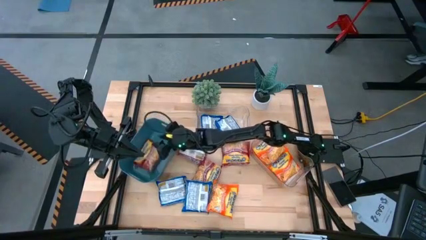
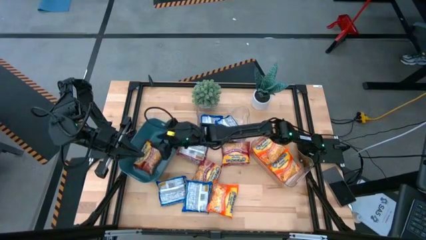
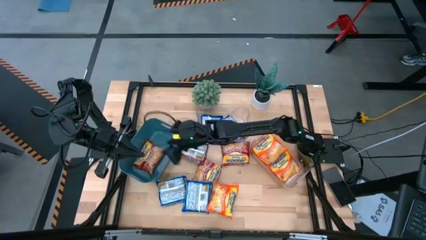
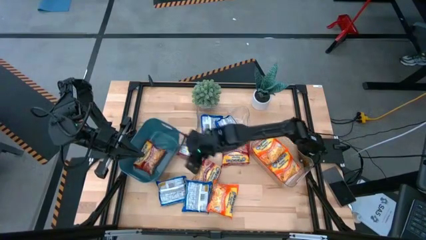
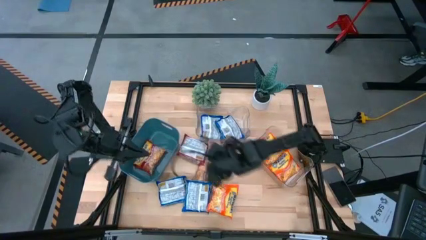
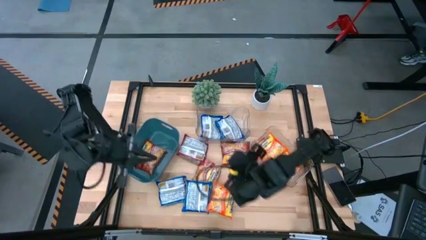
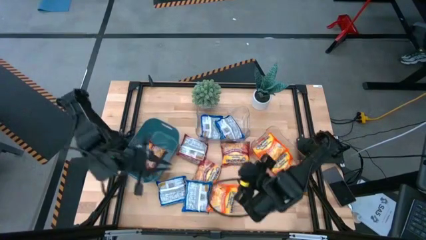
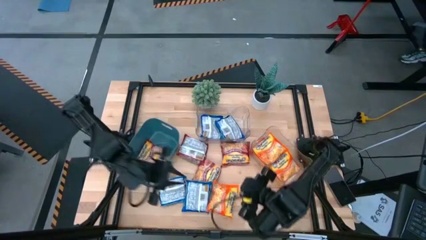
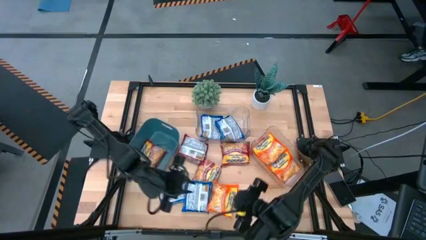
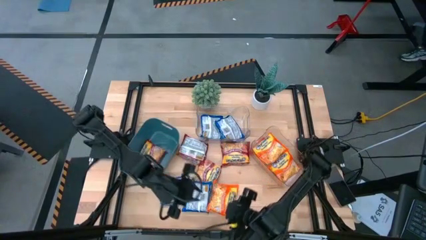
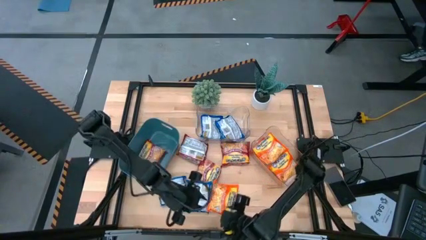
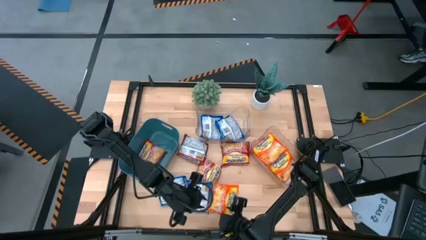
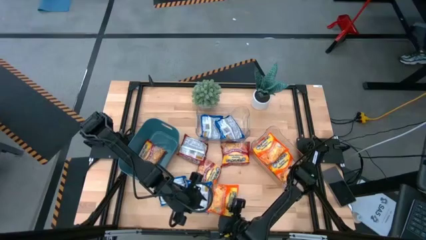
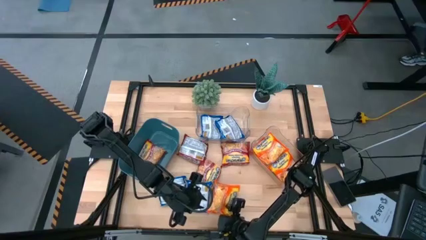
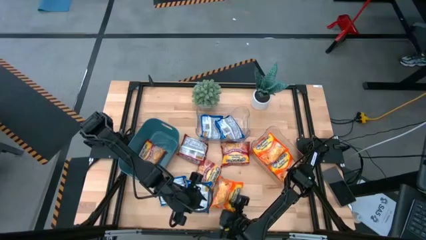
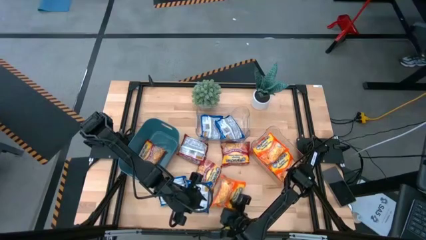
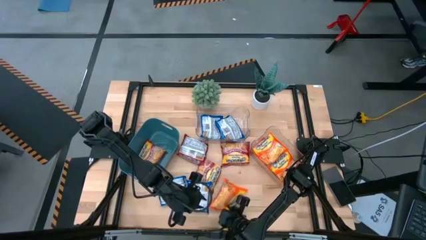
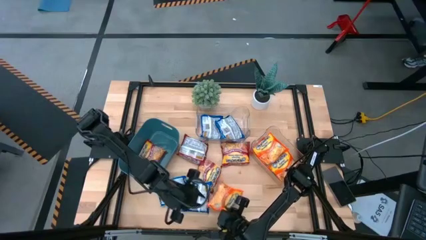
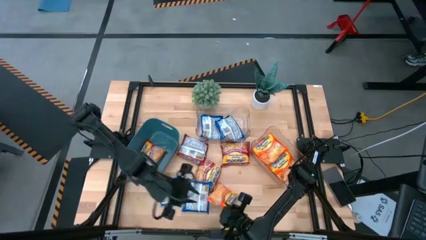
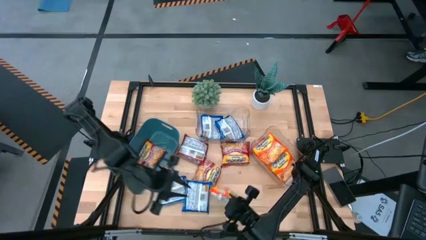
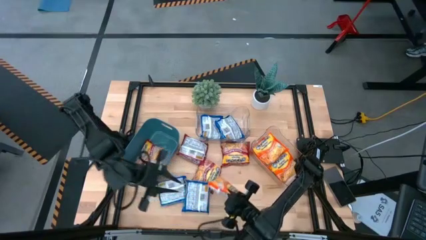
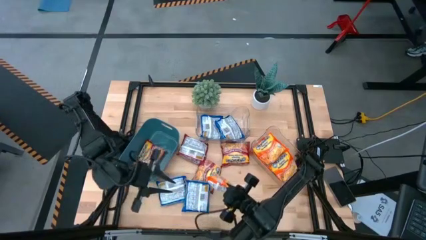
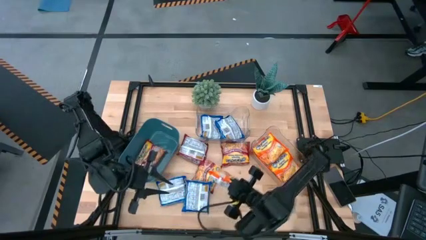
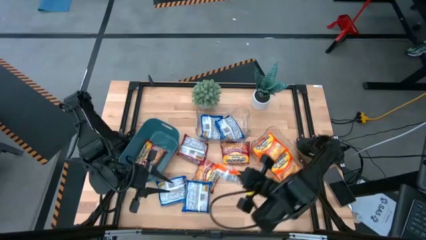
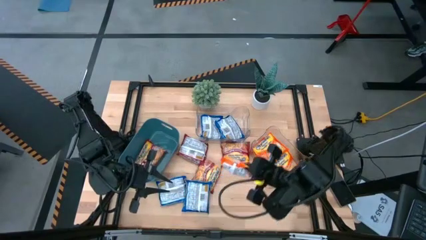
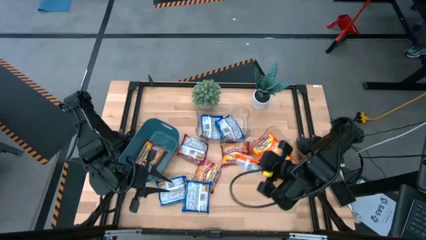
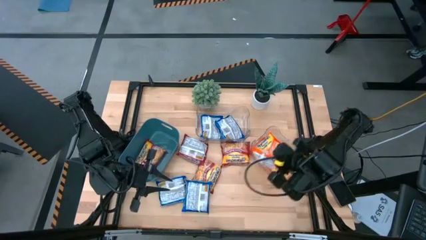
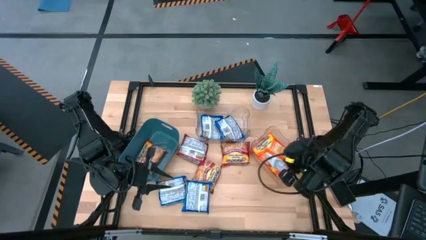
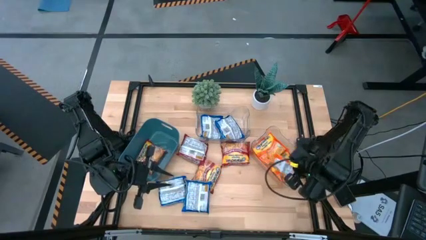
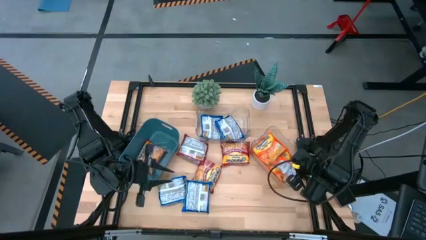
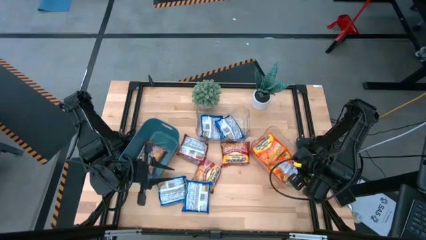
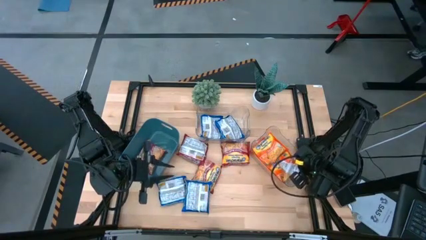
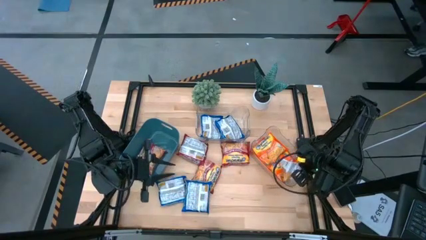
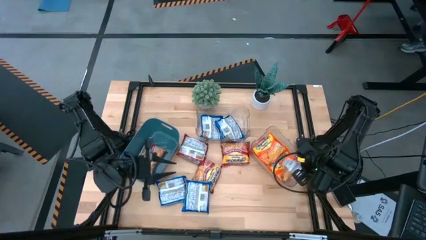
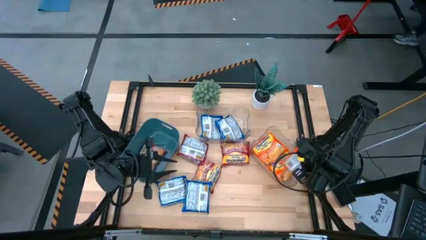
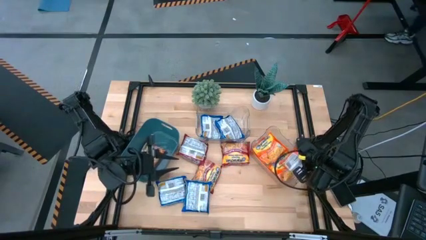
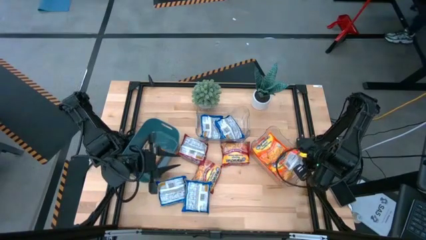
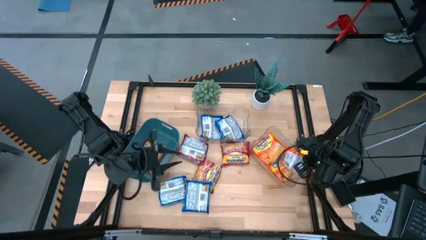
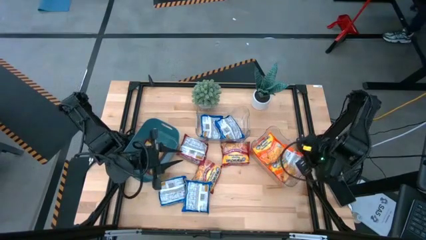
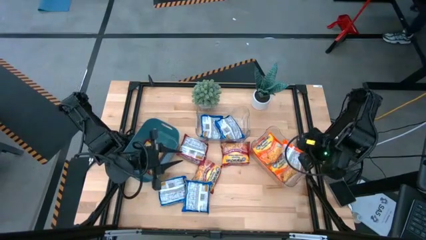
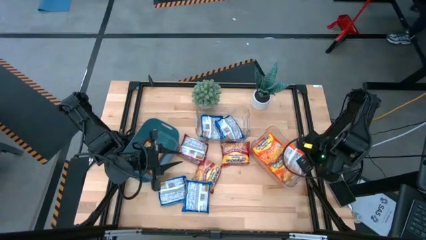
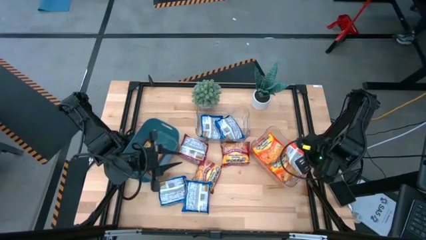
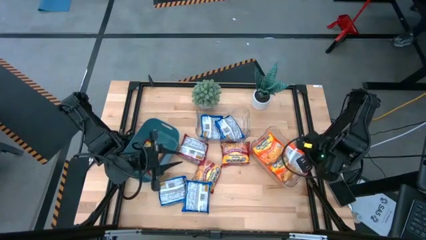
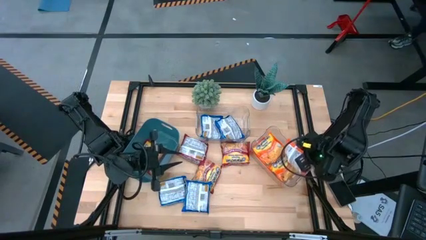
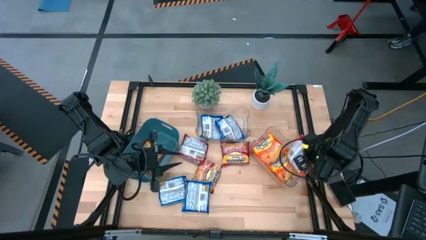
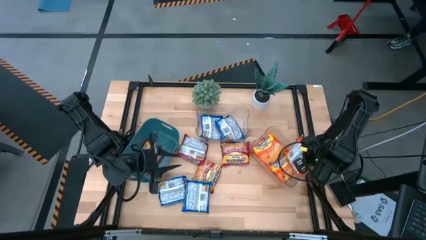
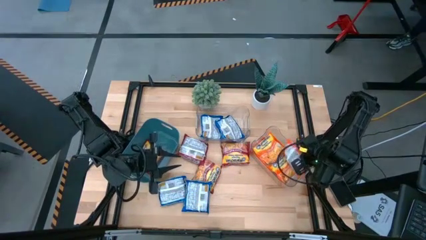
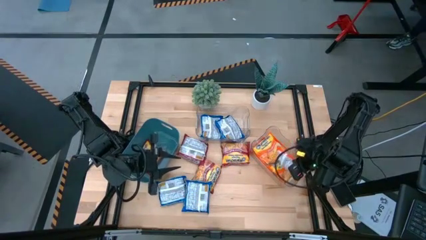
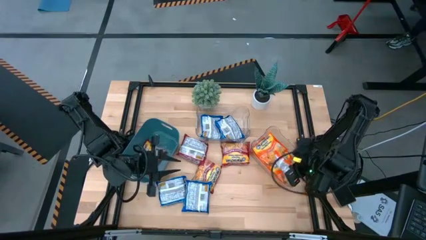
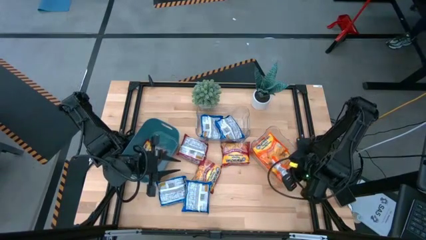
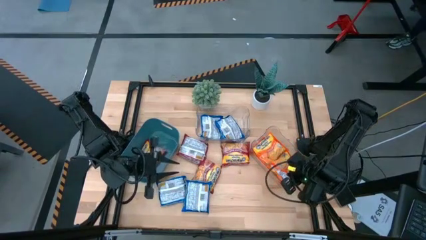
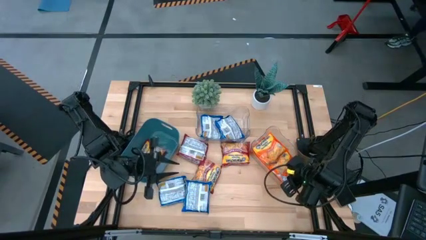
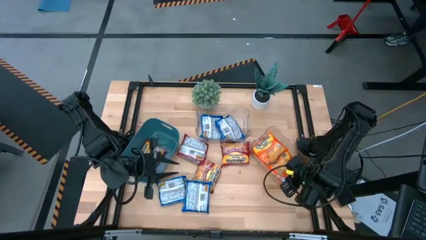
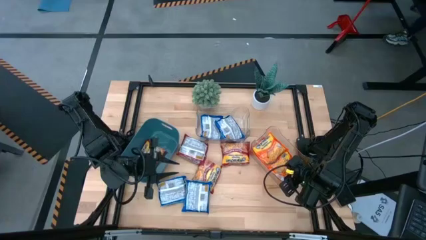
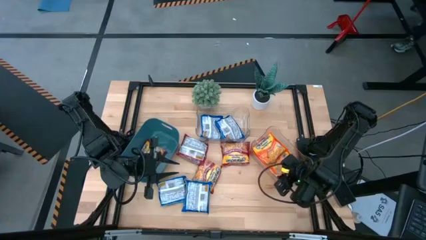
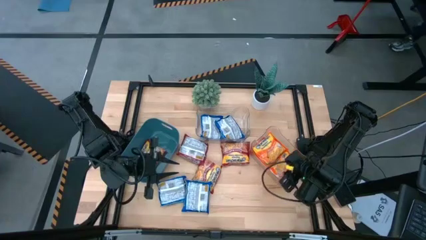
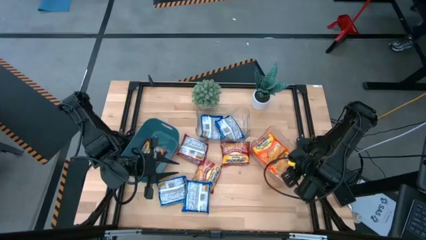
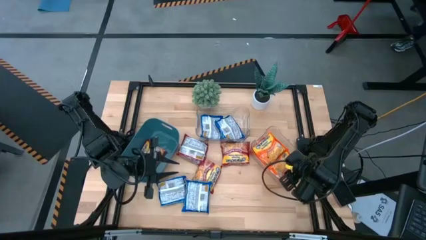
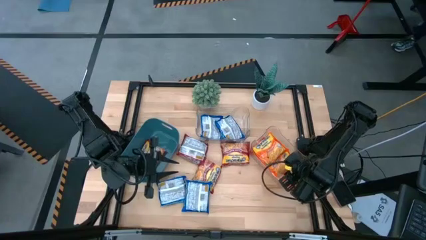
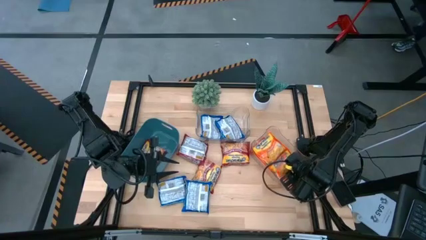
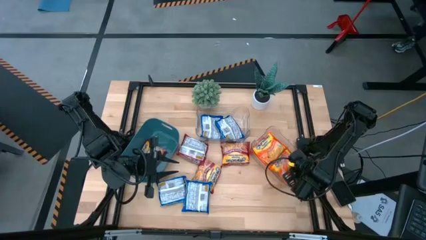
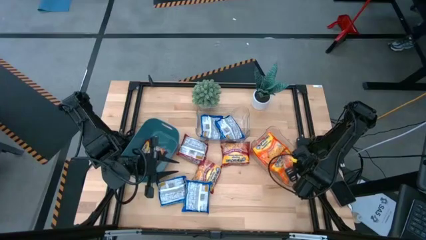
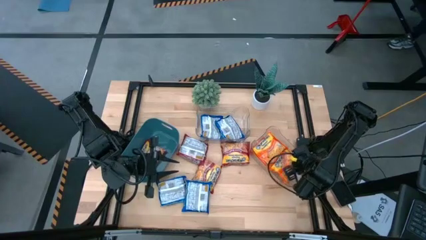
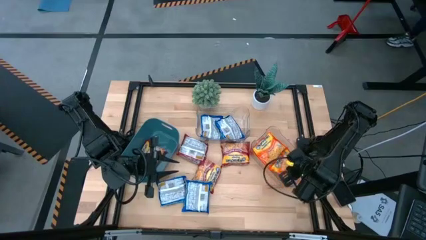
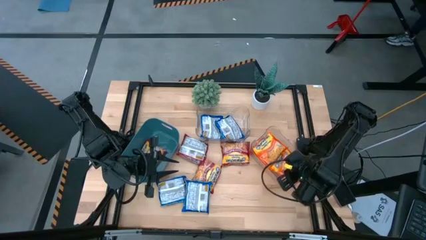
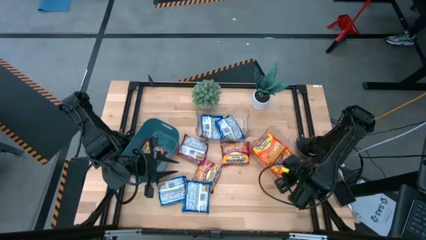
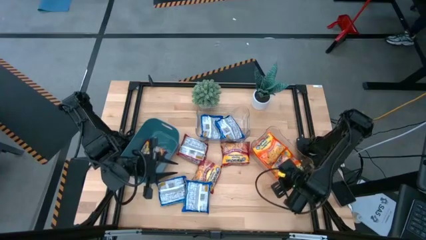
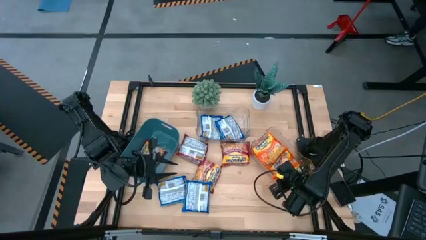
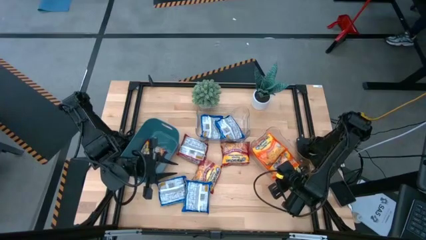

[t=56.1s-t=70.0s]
Task: Sort Maruchan noodles
Stack the orange noodle pack on top of the orange noodle pack in the right transparent bin

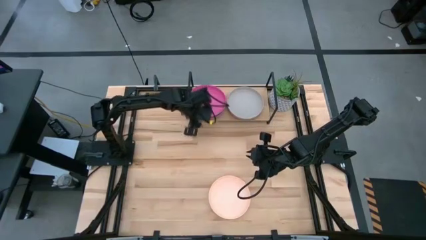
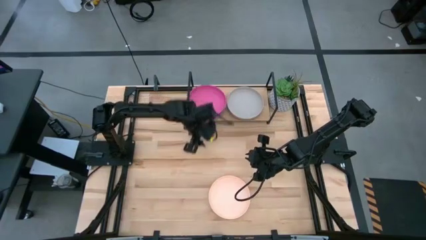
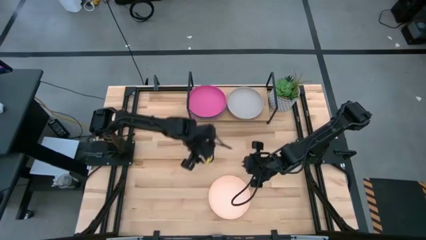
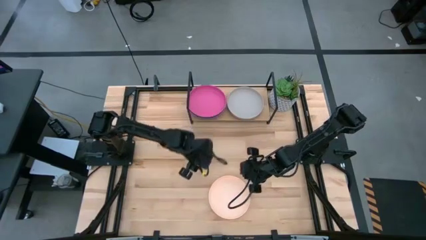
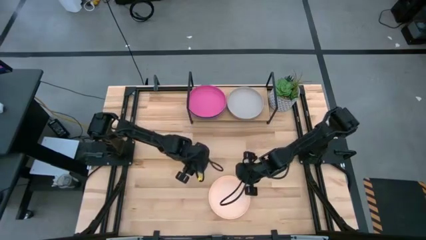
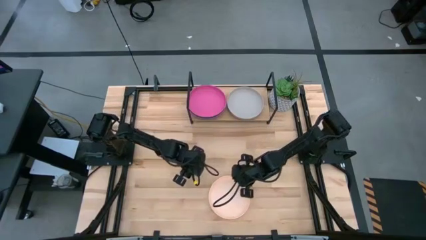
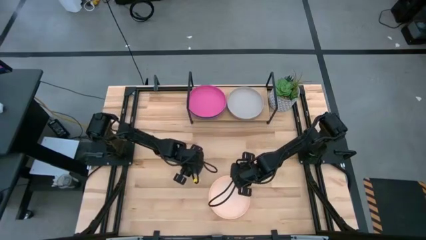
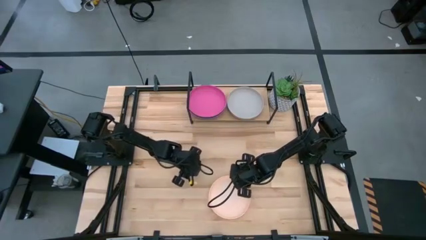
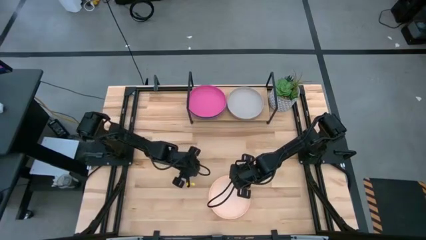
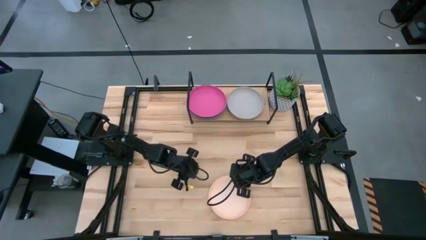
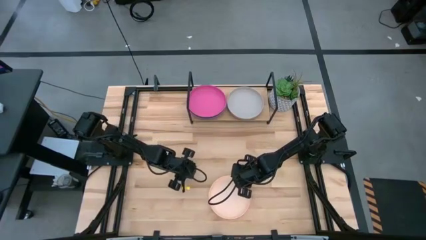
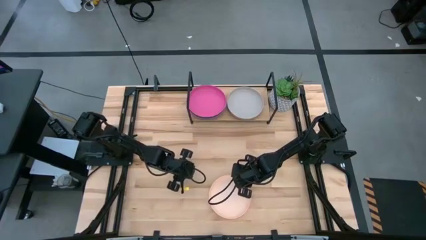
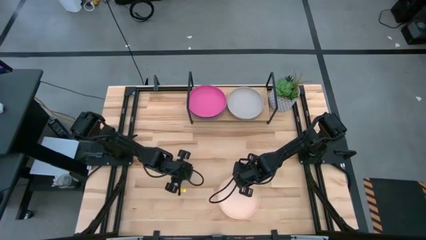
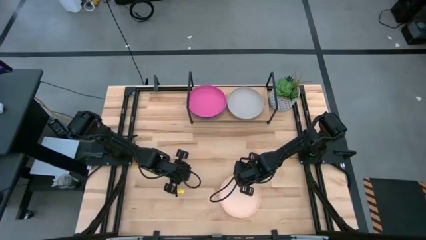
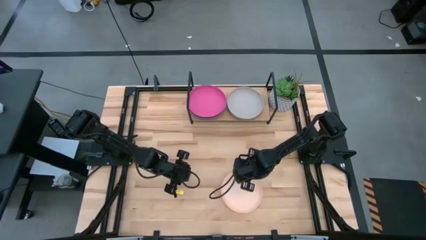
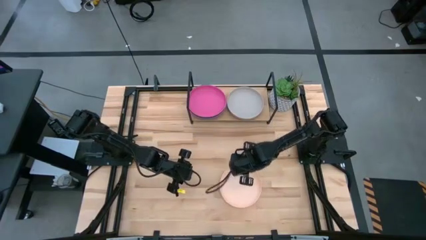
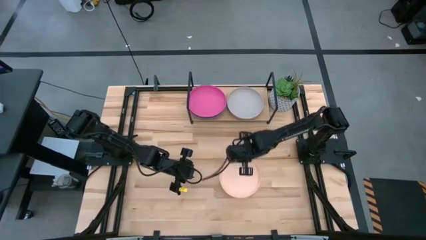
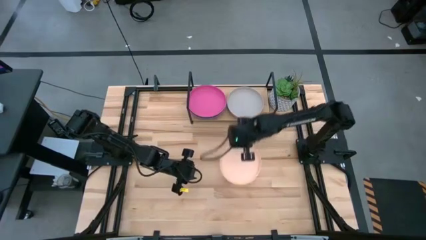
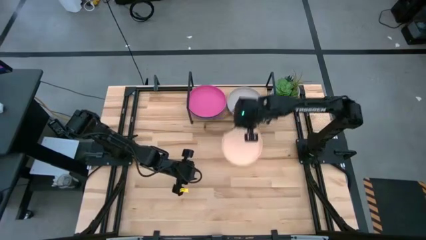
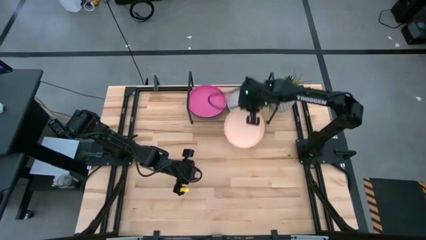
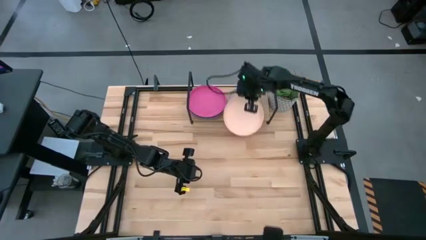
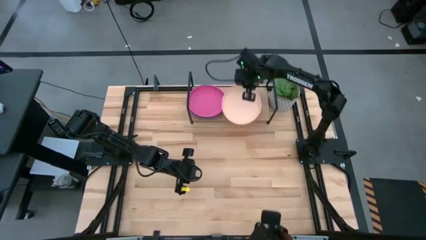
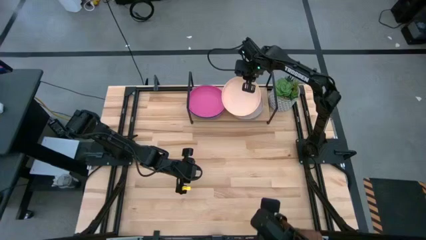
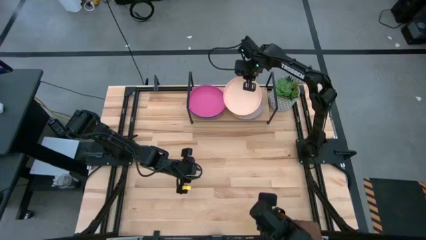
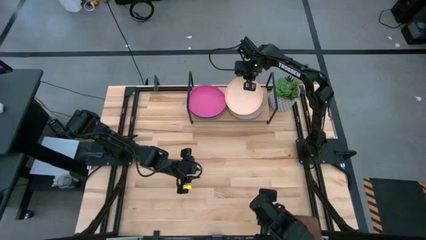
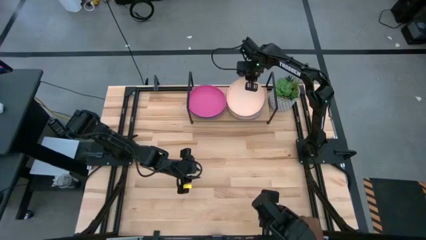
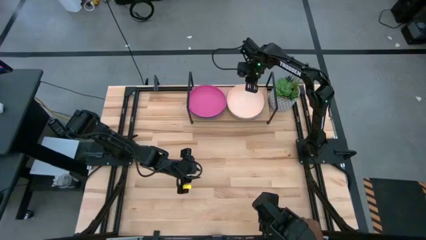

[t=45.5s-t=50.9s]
Task: Place and stack plates onto a shelf
Stack the light yellow plate on top of the gray plate on the shelf
